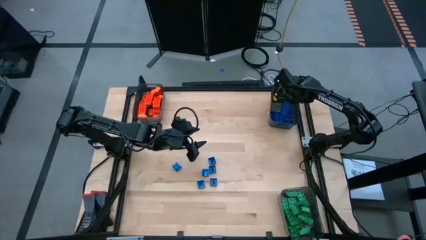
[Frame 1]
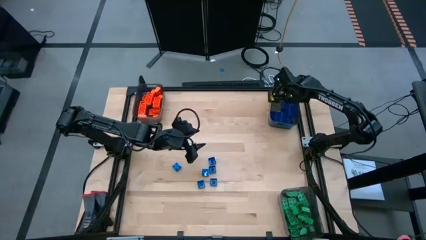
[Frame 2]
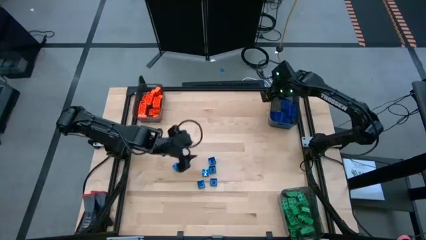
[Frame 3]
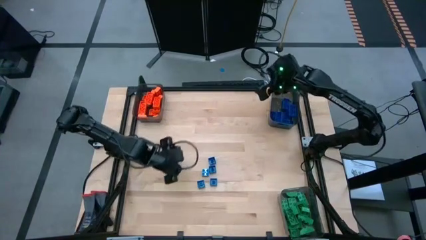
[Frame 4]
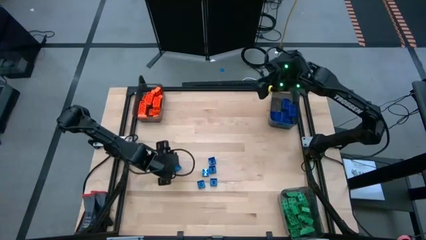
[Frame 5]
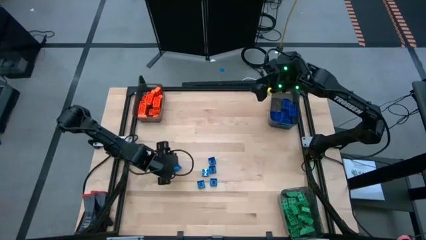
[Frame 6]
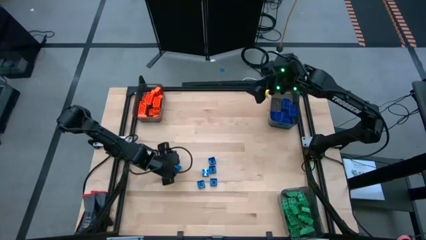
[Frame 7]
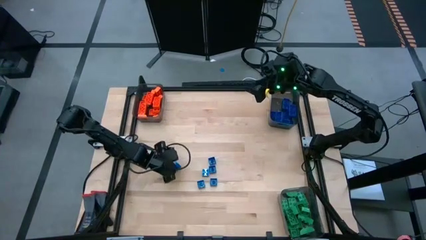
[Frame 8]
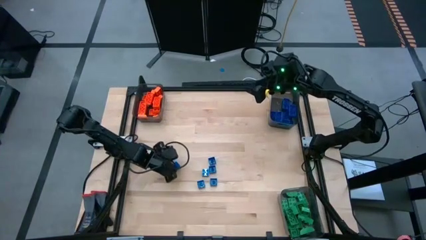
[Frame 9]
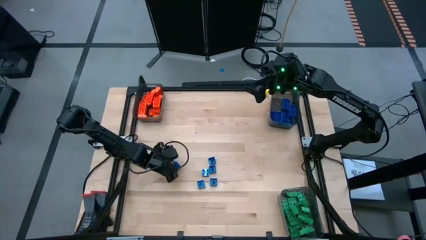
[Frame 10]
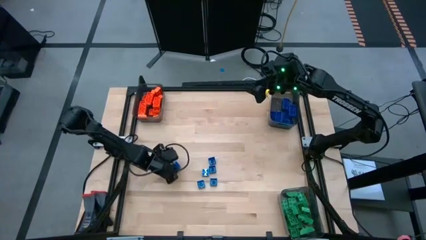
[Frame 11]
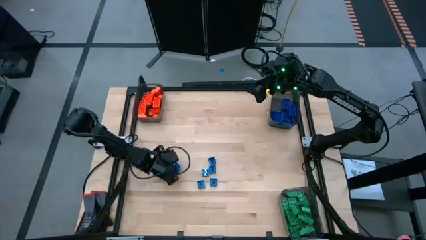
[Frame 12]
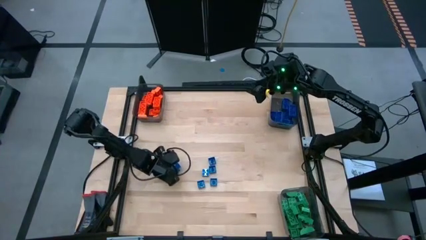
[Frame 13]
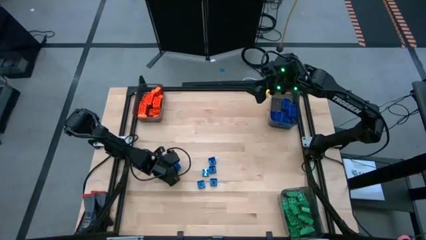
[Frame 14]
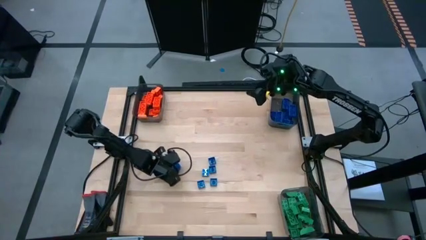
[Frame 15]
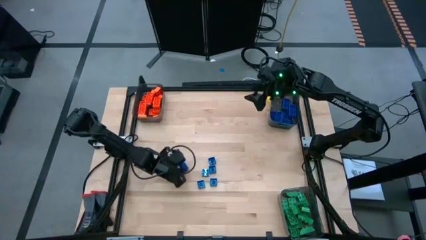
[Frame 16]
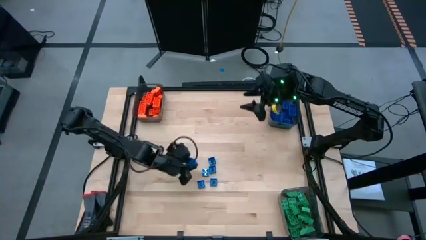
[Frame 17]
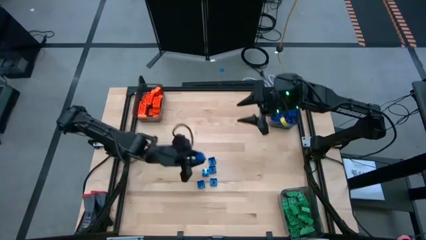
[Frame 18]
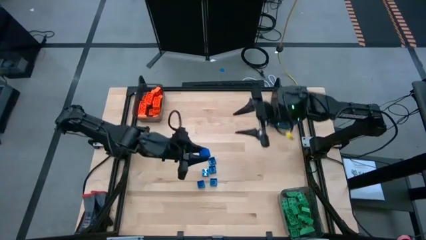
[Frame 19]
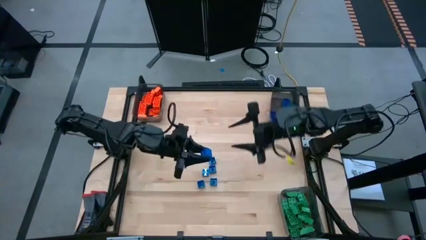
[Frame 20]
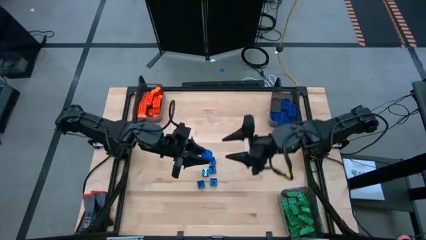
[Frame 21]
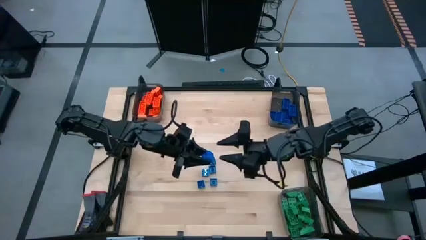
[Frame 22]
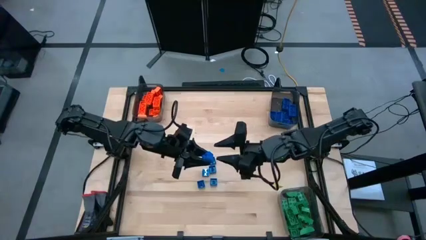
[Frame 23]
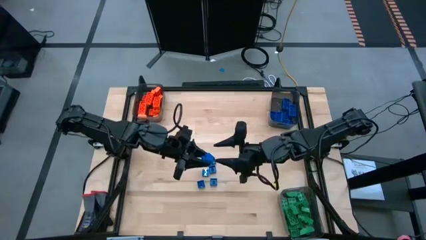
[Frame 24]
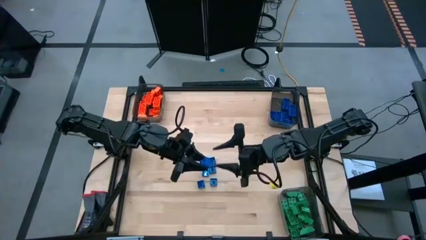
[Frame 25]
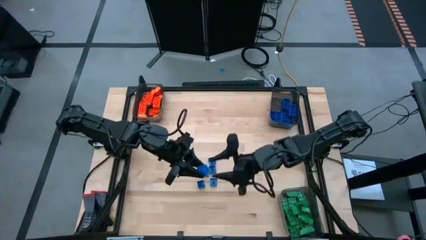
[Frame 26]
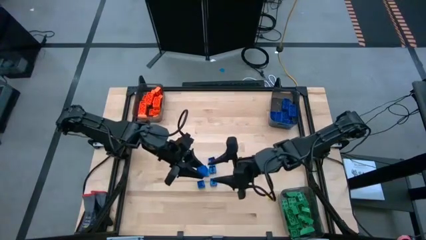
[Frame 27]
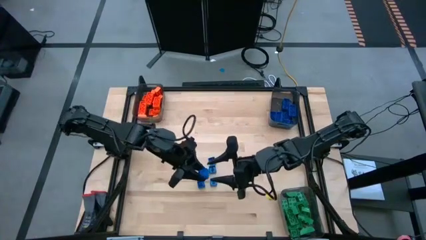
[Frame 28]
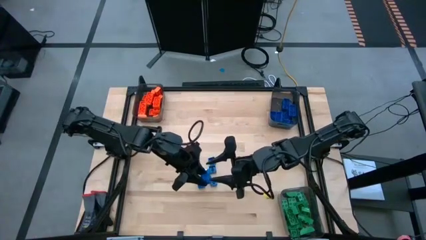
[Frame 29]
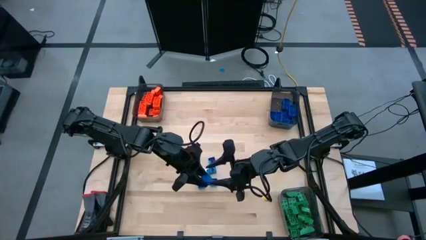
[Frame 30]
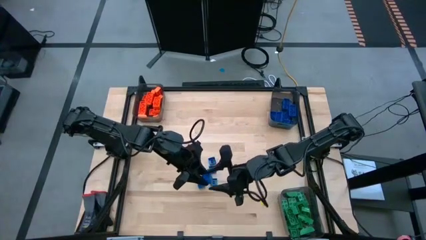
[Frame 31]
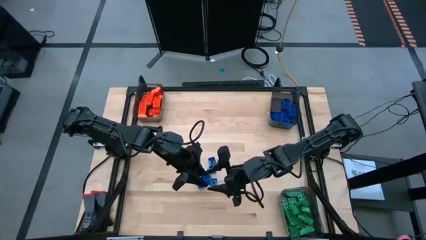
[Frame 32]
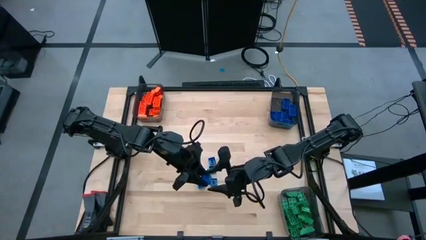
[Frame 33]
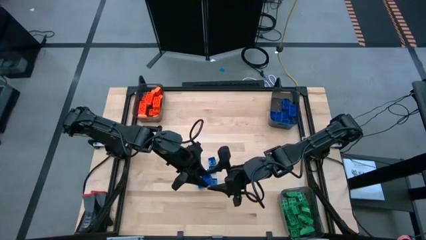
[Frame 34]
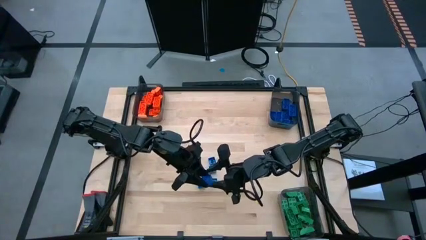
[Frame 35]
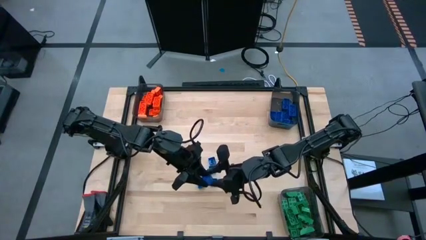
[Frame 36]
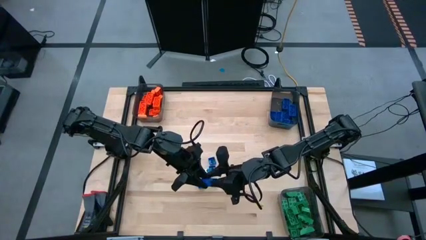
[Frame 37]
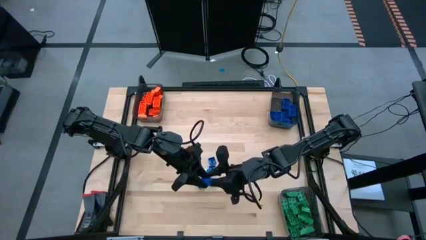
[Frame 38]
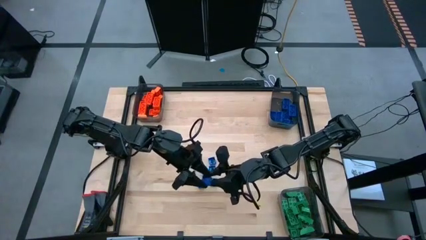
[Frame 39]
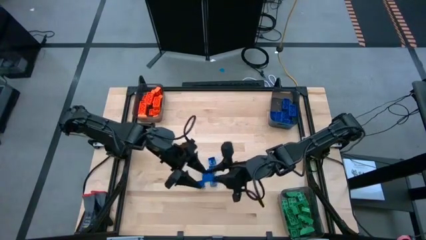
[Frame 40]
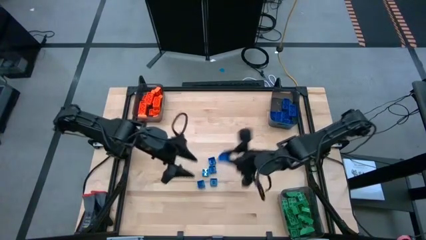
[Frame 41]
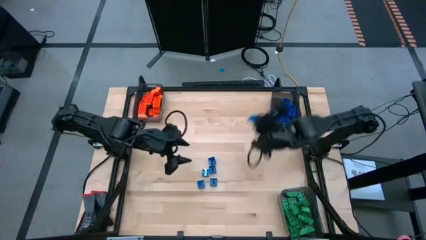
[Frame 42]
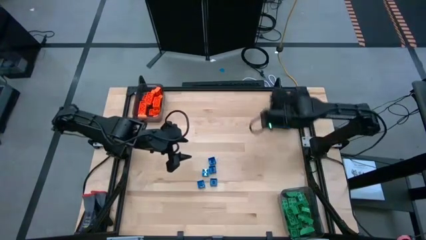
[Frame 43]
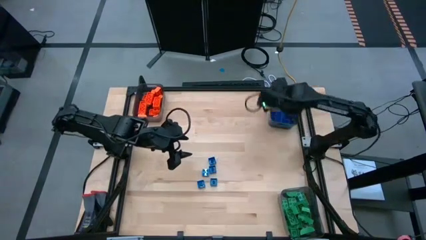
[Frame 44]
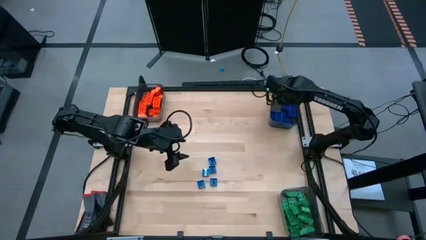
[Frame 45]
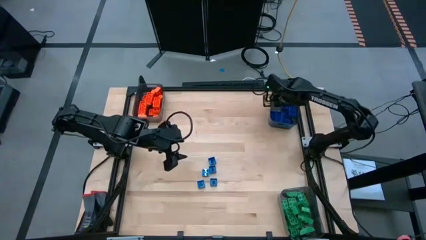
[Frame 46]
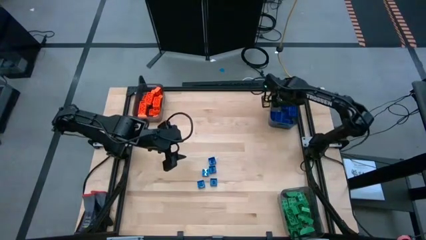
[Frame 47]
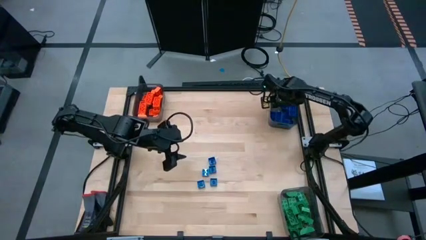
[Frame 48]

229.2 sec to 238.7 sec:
Task: Sort blocks
Put the blue game piece into the top right black bin

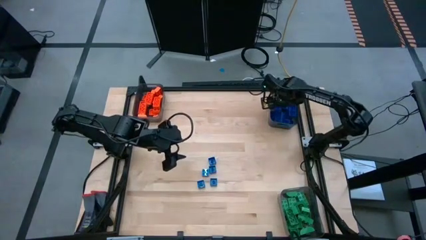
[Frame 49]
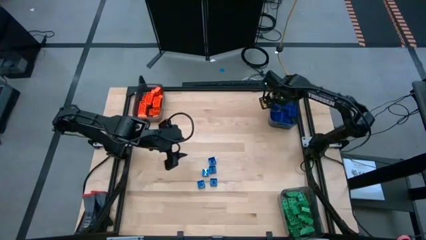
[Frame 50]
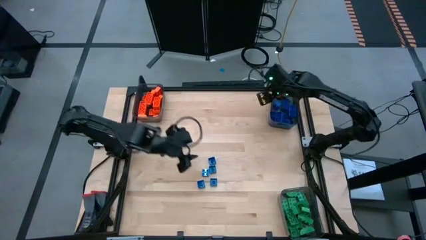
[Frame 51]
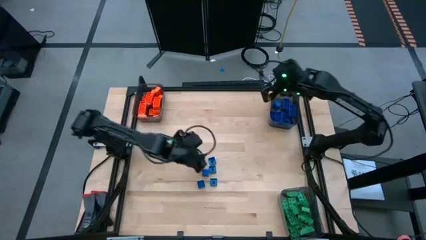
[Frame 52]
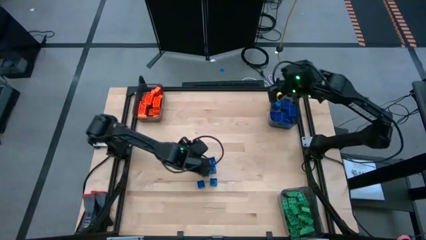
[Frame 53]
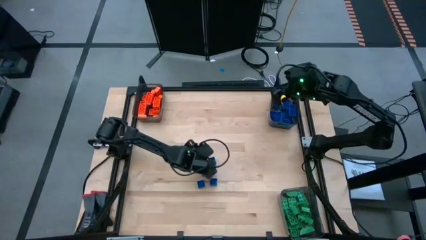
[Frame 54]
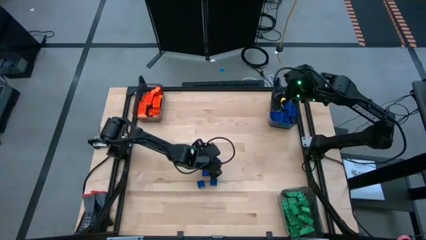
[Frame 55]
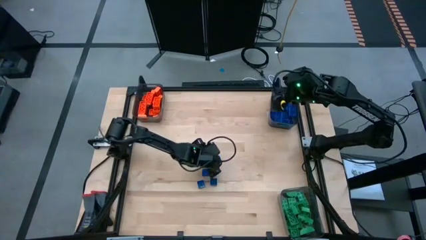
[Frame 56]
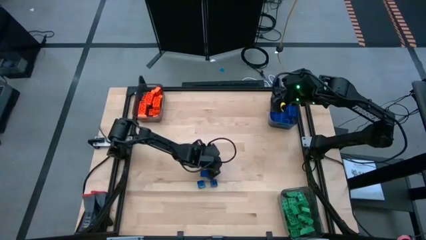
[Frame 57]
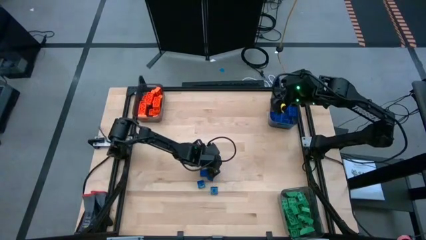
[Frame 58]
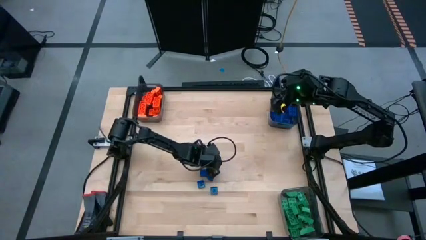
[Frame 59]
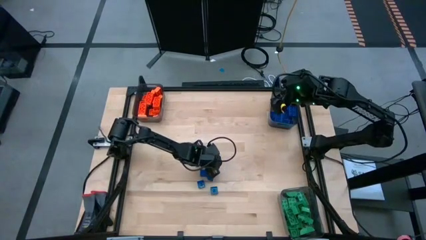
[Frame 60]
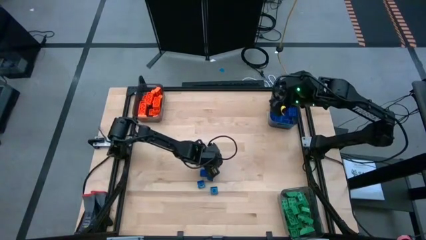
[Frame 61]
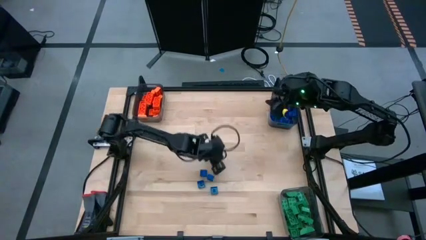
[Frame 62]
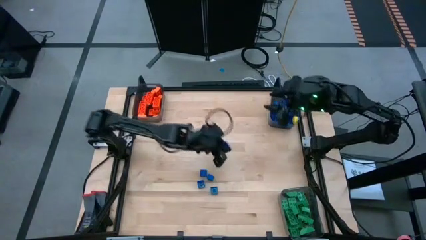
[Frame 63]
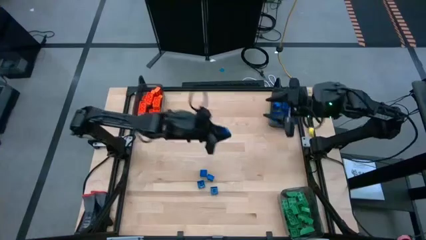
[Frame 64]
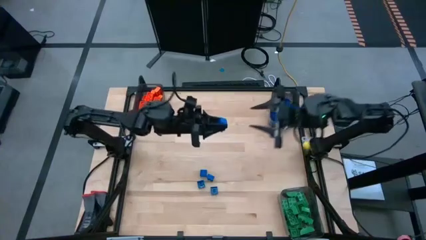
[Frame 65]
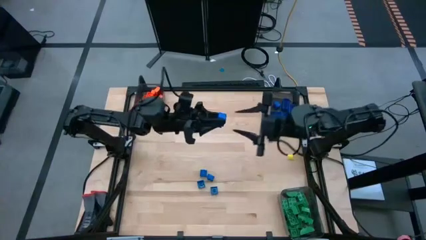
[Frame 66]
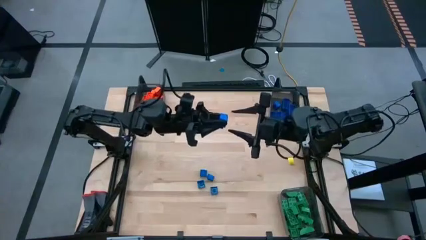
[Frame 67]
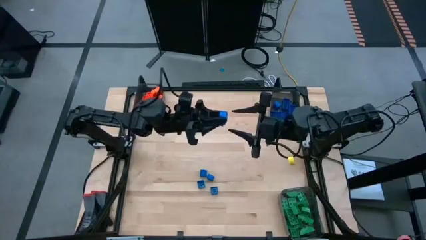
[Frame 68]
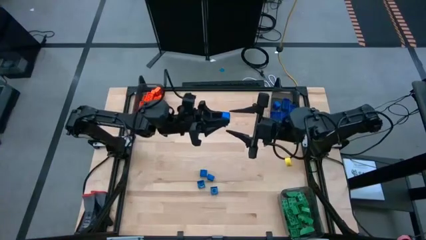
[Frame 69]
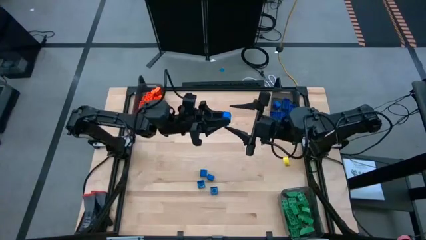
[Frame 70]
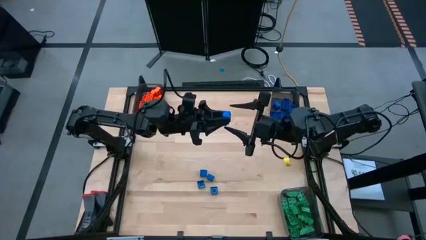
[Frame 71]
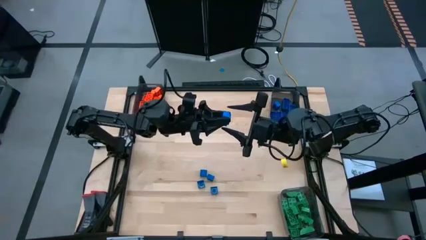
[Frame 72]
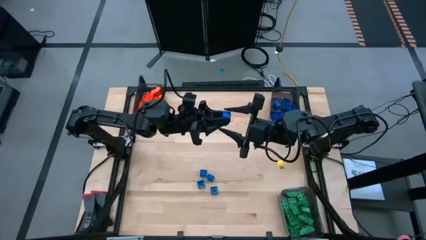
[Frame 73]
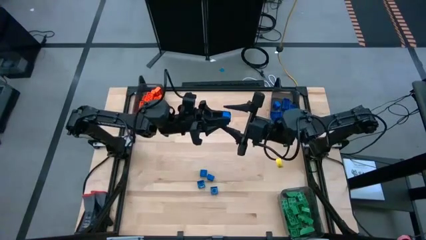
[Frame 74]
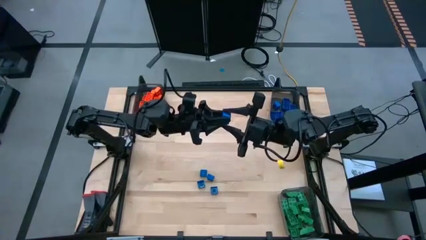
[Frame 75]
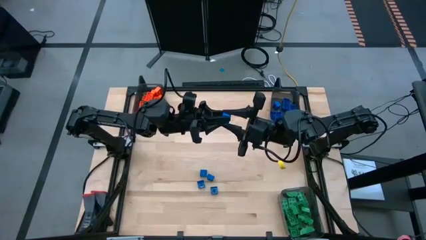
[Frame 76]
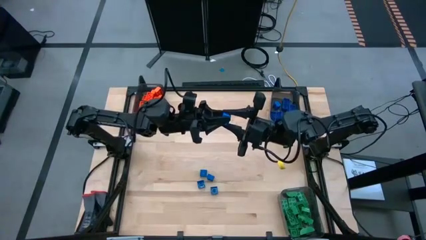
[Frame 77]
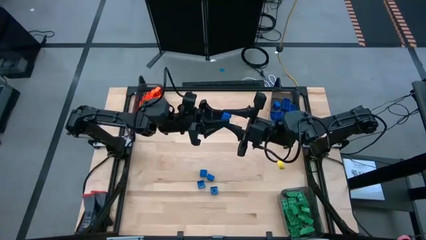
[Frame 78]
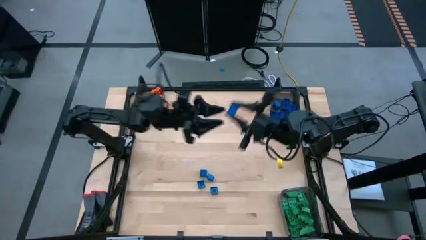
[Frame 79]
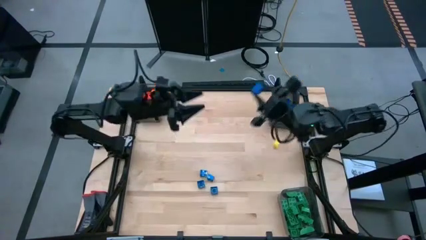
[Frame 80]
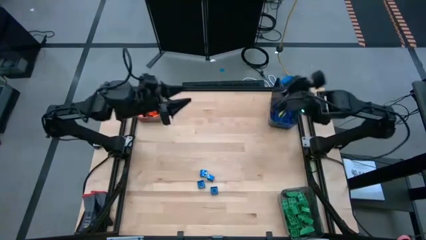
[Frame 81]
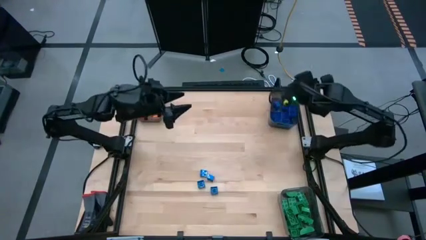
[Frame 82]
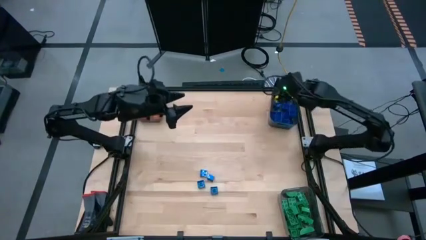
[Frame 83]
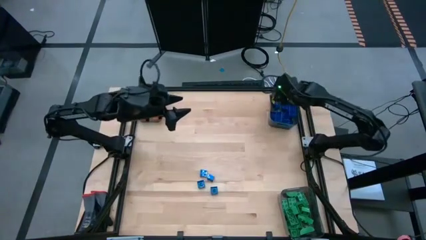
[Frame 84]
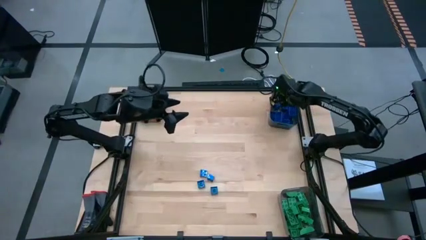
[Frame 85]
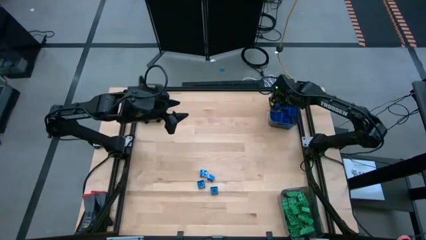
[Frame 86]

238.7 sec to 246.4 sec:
Put the blue game piece into the top right black bin
